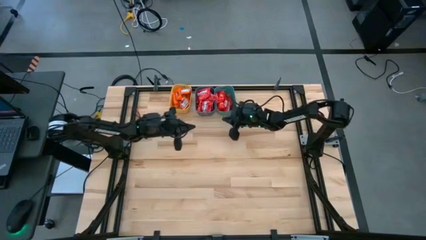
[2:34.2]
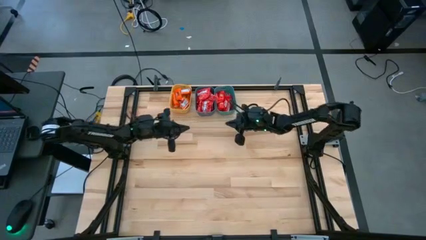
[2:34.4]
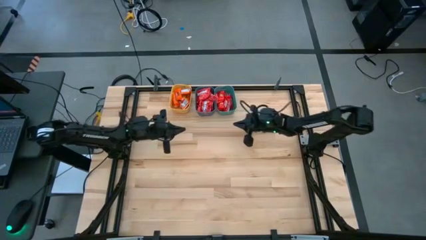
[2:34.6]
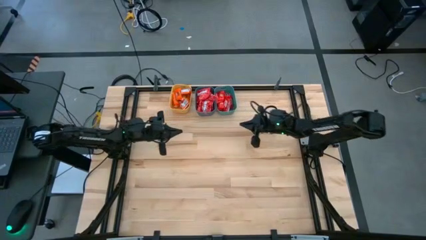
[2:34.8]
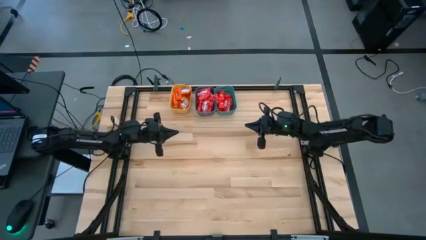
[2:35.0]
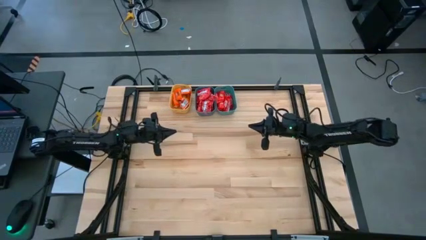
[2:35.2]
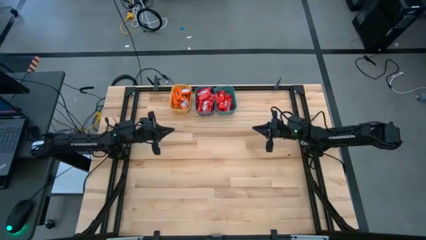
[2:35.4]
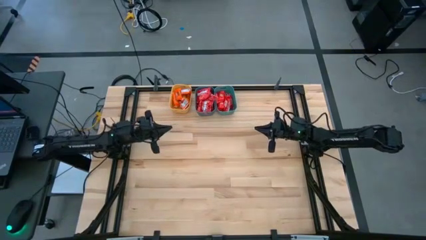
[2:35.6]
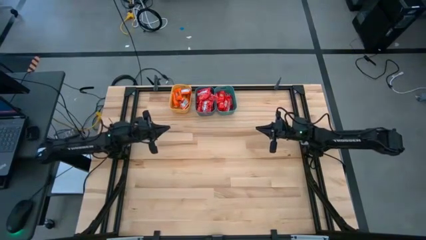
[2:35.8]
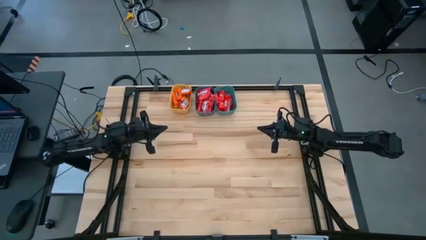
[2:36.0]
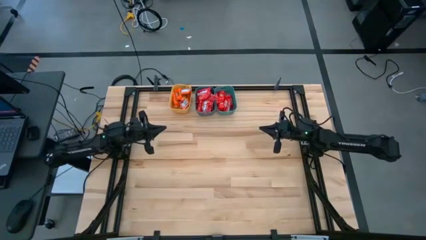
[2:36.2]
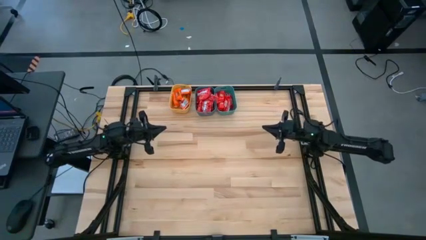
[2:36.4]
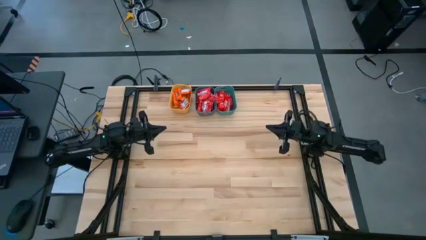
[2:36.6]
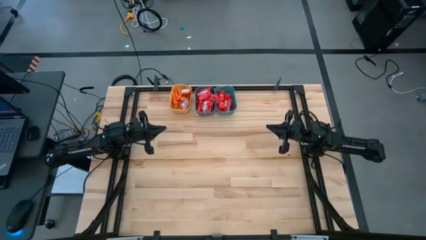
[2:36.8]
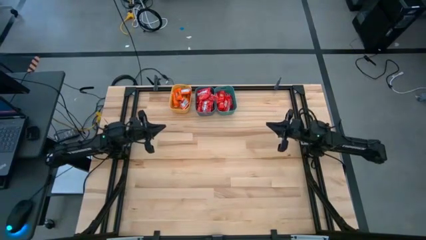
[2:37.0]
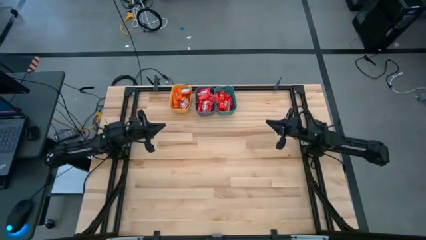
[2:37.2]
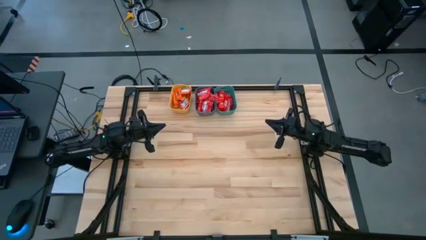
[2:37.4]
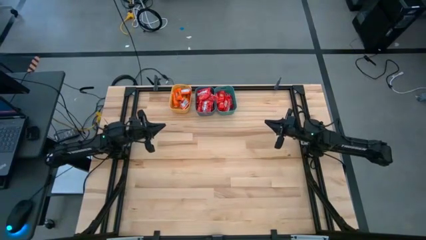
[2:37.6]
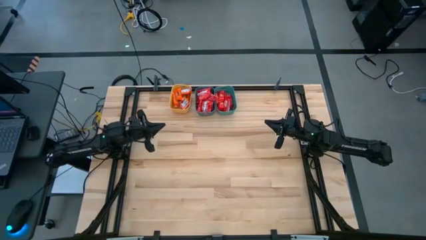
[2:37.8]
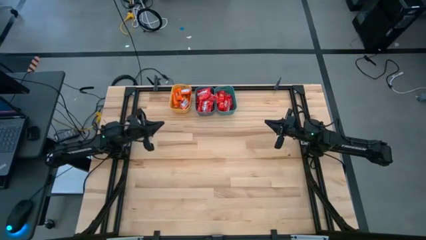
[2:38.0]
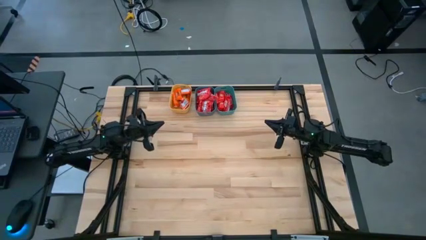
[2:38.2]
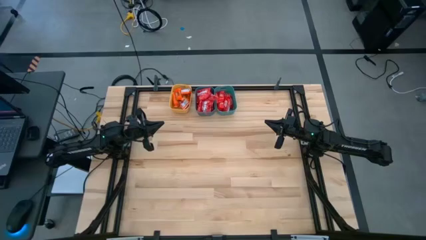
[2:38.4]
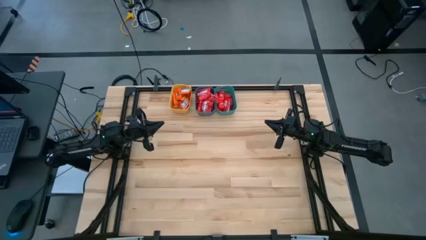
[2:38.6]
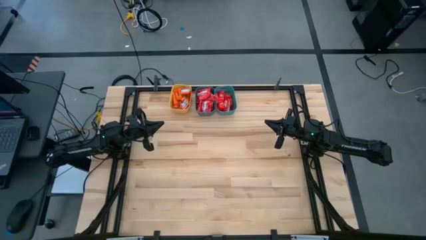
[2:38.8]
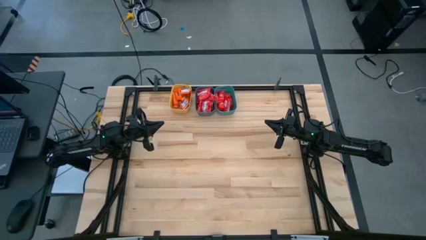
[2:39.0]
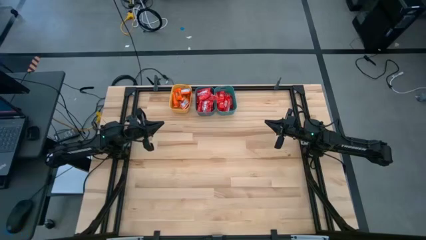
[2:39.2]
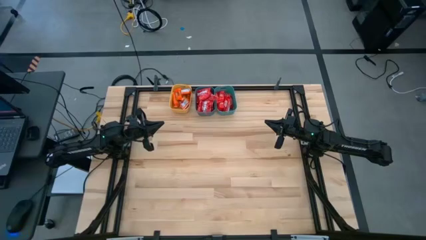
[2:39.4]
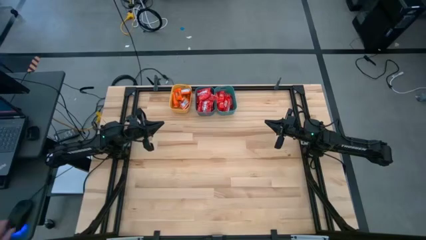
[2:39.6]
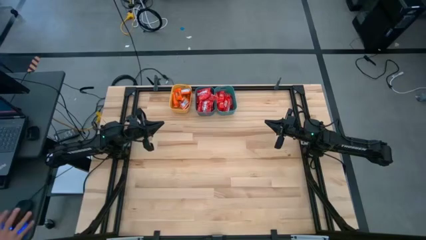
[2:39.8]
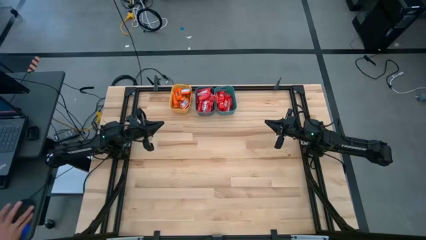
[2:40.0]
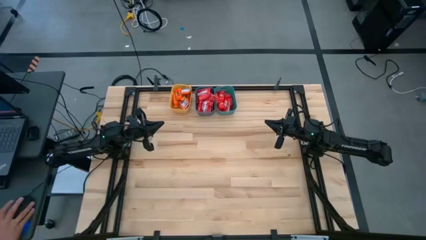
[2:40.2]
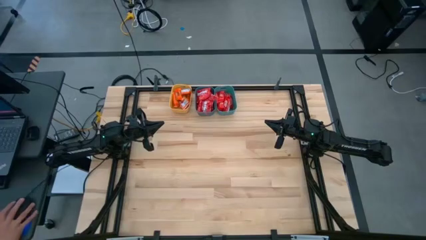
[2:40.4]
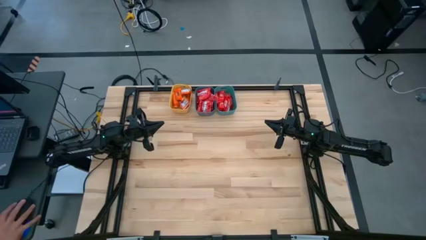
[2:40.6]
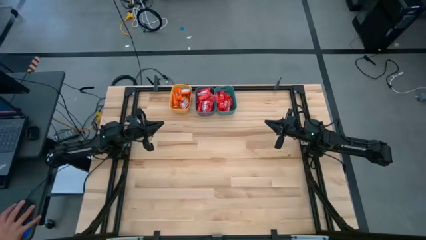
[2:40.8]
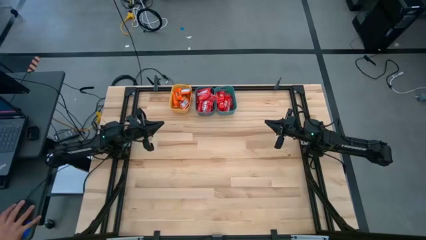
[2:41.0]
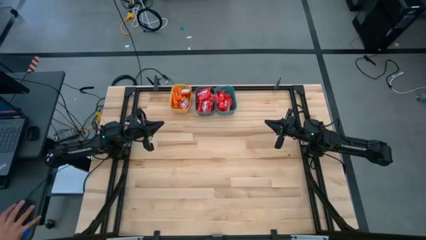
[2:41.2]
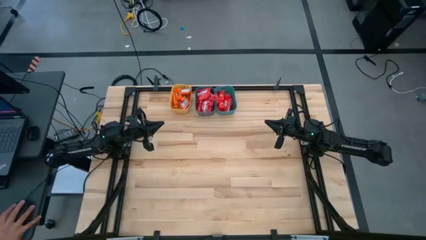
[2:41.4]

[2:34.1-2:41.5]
Task: Sort candy
Return to Home Position

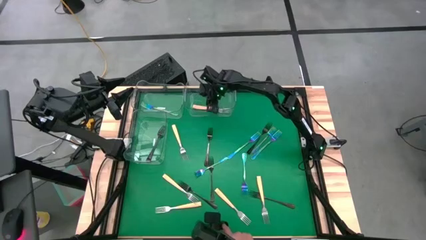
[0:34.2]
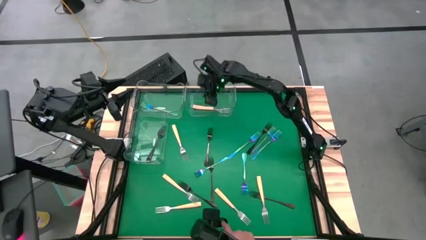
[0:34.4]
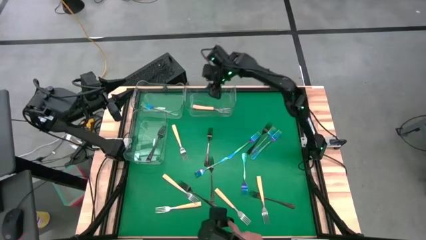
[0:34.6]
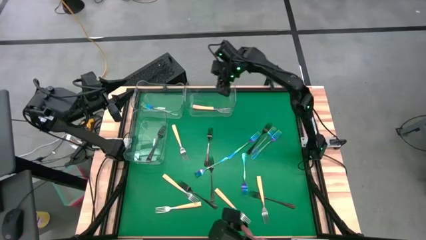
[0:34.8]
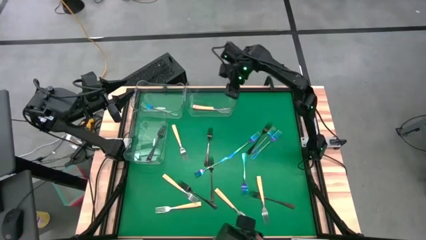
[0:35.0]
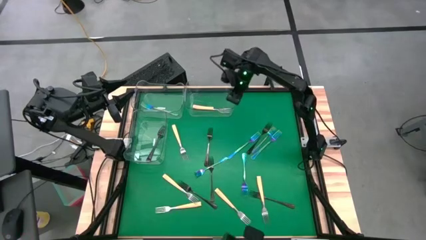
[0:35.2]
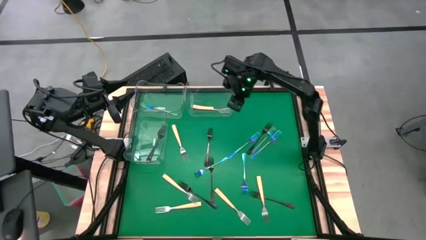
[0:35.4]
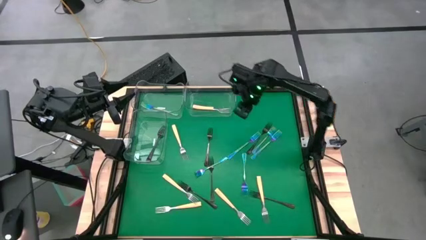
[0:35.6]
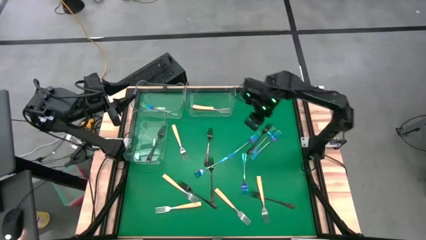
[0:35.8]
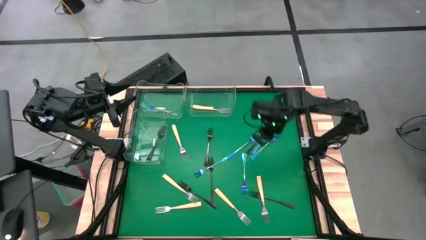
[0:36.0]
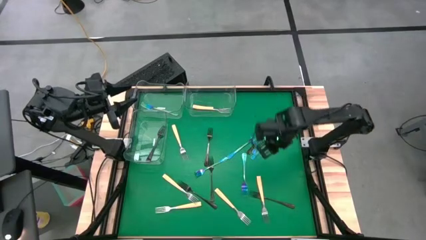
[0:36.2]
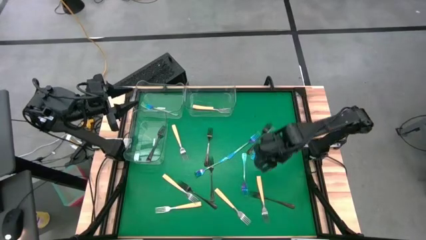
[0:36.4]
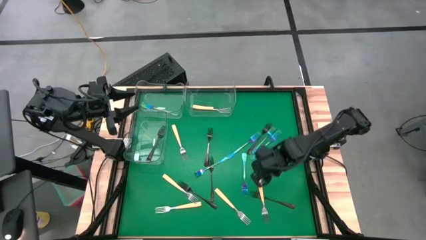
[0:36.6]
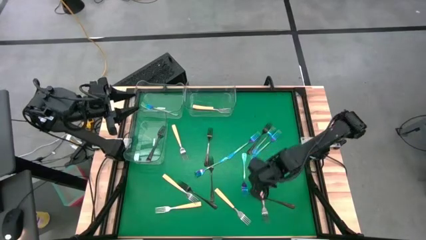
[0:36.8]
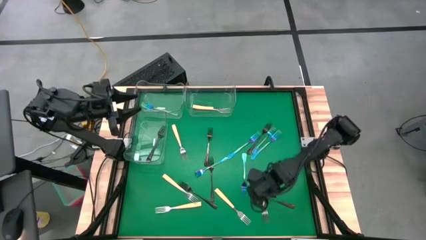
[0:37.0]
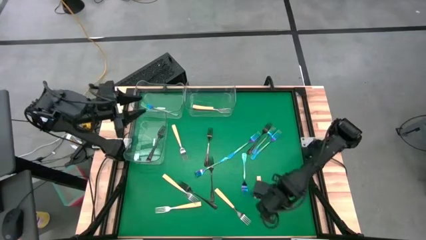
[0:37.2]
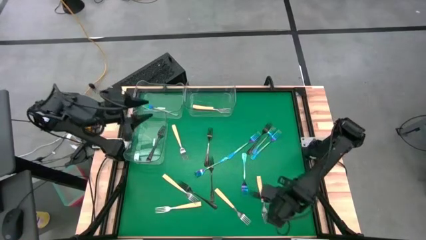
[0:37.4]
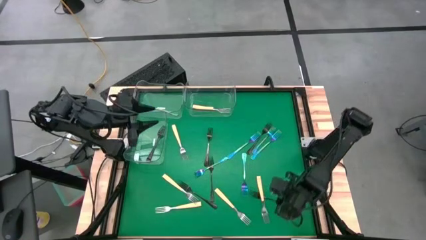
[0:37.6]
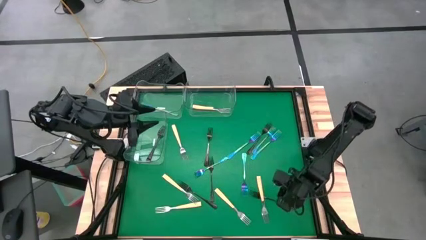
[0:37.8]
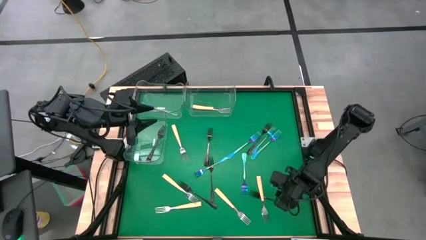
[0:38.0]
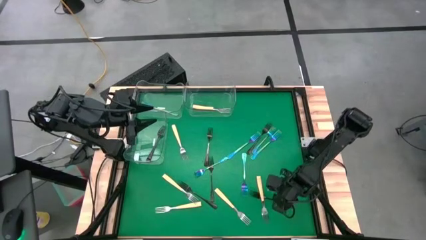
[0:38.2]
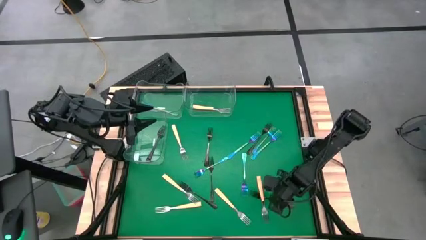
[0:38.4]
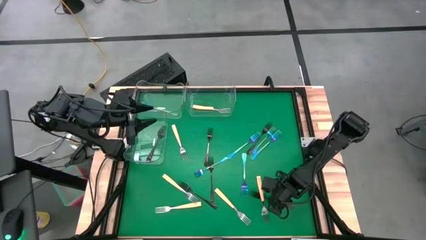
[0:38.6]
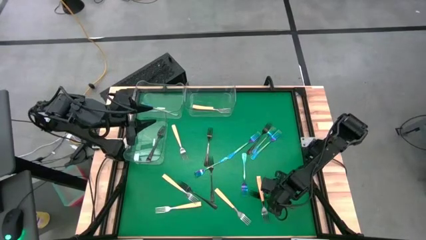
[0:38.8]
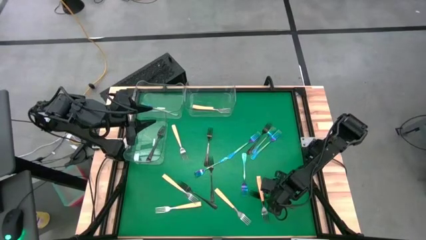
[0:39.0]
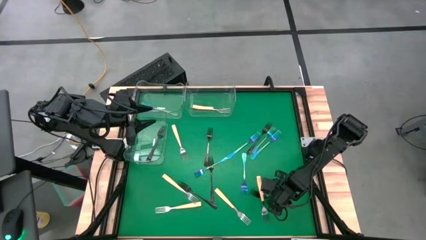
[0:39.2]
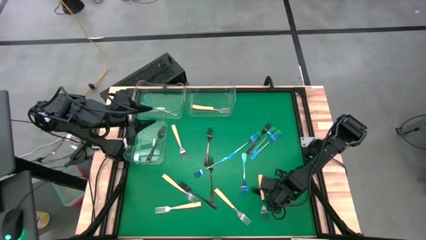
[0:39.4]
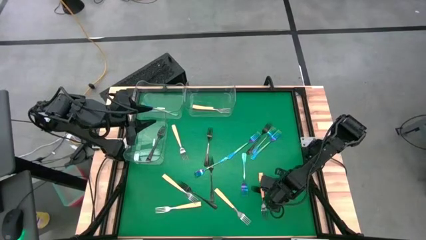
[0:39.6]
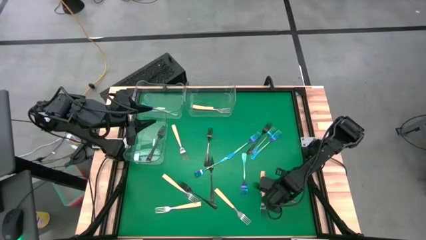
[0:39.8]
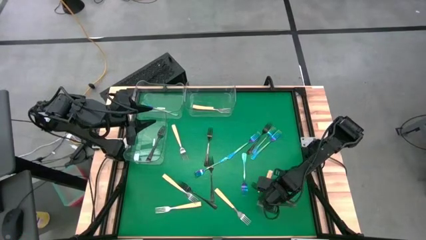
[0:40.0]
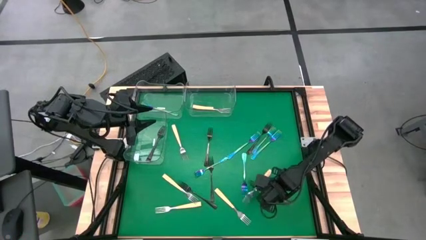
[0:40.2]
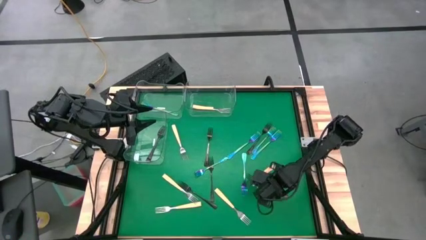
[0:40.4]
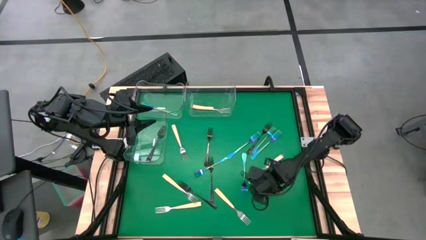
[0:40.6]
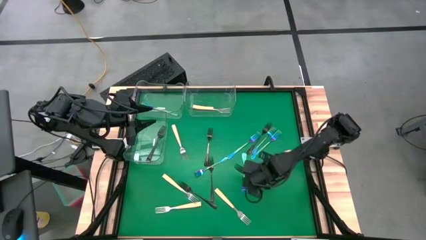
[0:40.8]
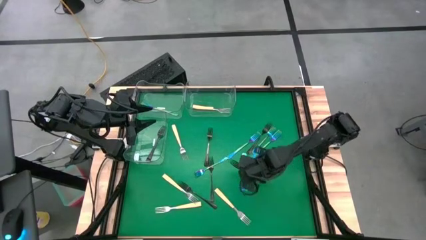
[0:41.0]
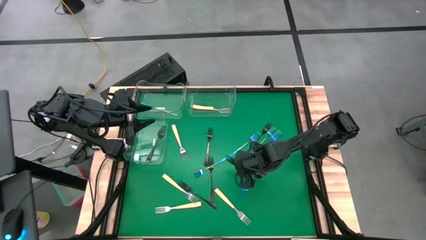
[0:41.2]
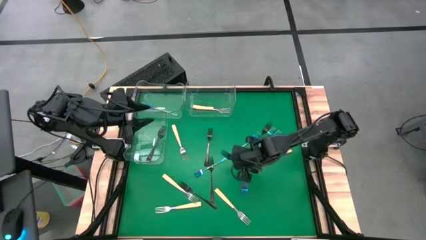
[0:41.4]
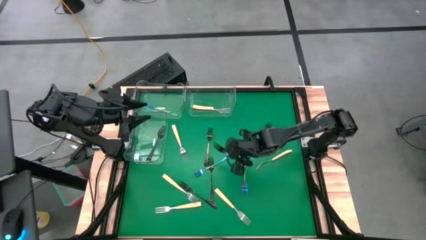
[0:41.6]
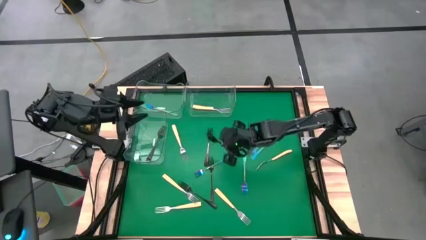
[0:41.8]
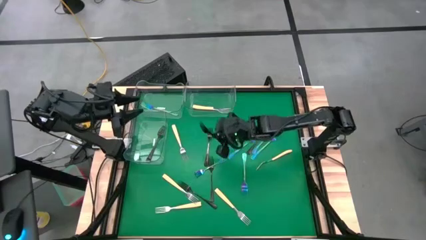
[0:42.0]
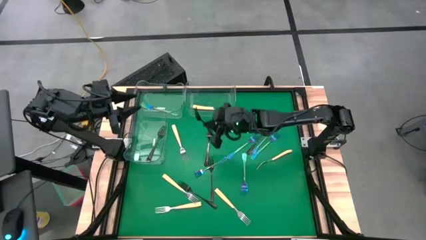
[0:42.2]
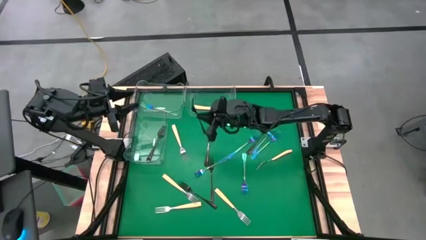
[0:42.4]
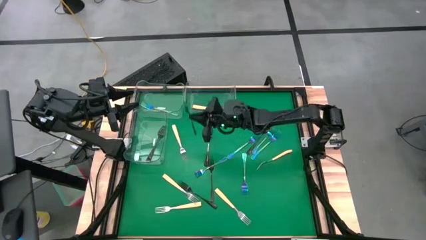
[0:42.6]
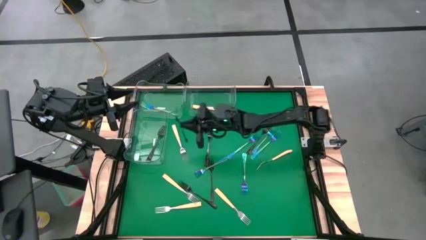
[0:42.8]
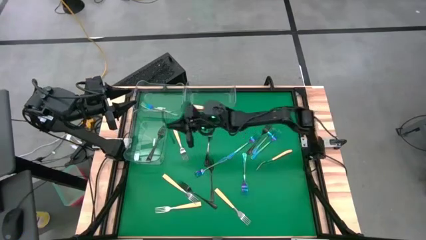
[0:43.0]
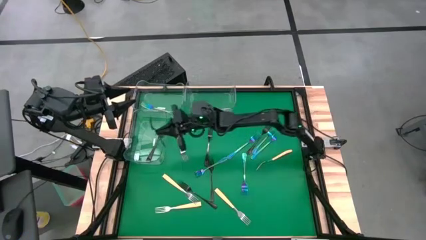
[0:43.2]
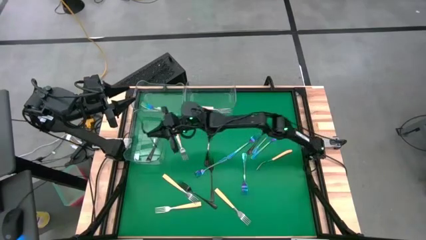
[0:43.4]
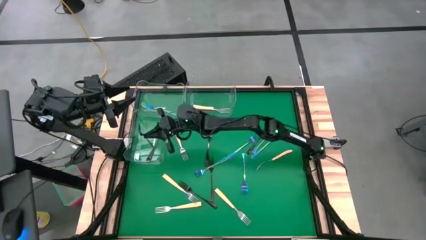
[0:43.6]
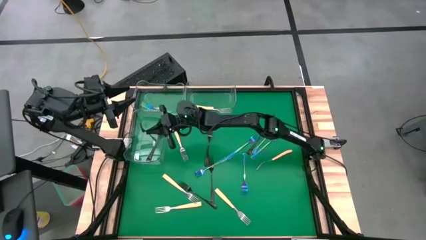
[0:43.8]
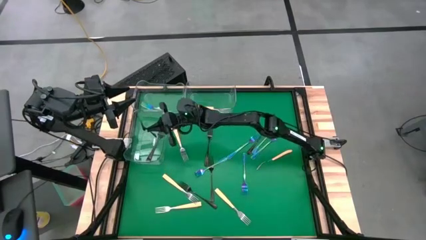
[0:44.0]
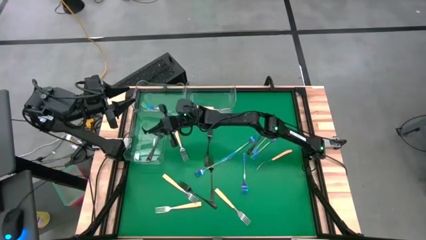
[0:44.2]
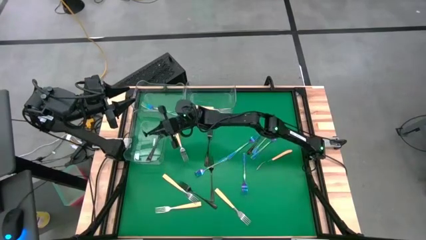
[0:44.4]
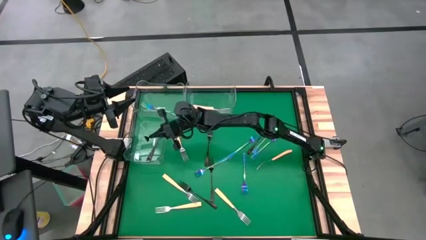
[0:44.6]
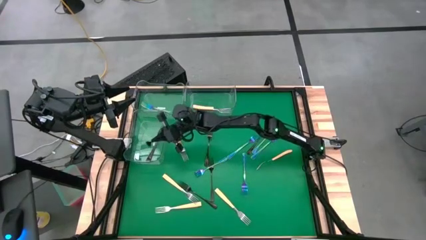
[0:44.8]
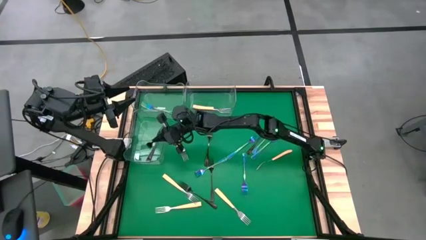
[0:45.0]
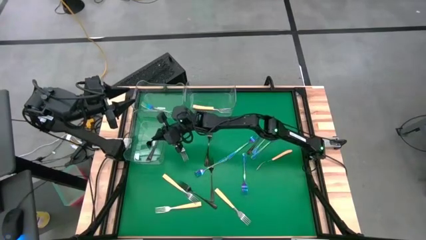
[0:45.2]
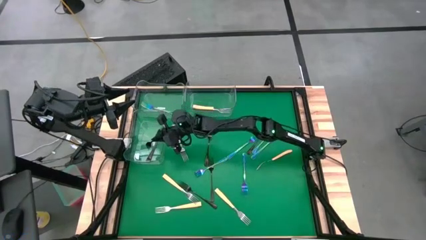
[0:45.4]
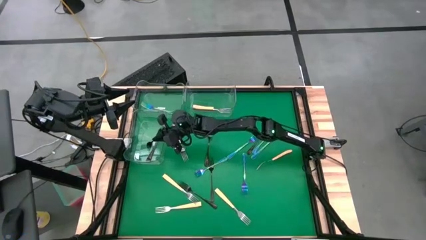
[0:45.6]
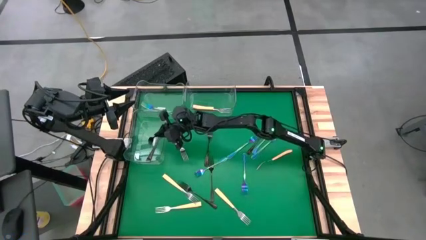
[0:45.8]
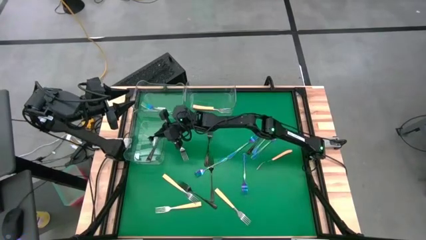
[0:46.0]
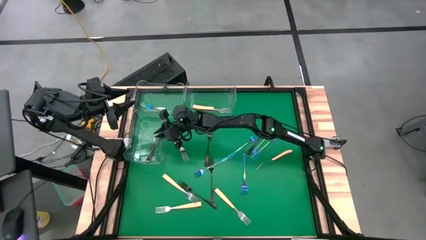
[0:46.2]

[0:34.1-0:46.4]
Task: Sort silverware by color (type)
Put the black fork into the middle left transparent bin
